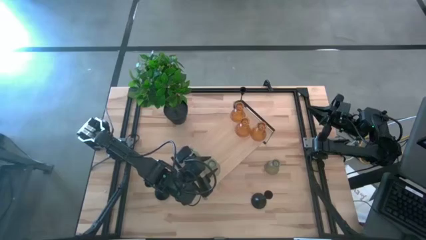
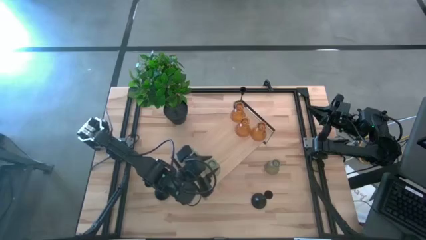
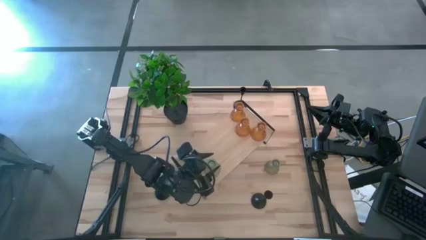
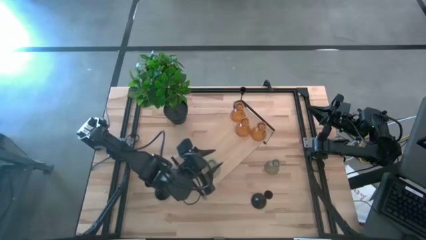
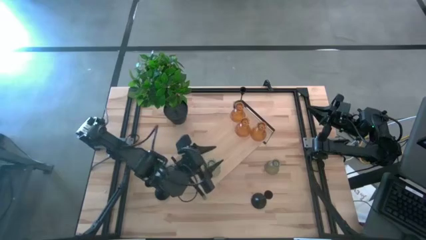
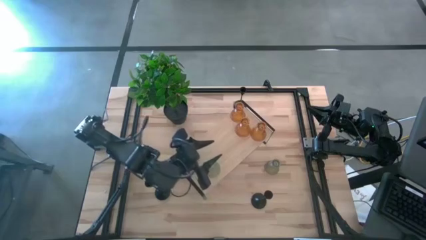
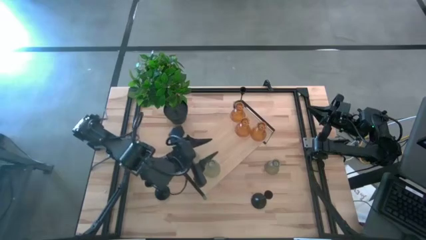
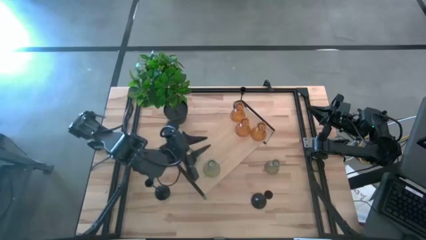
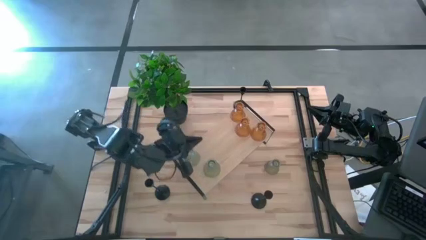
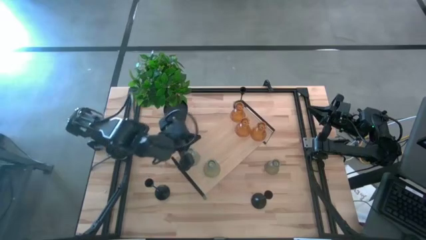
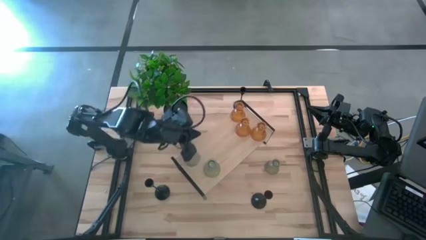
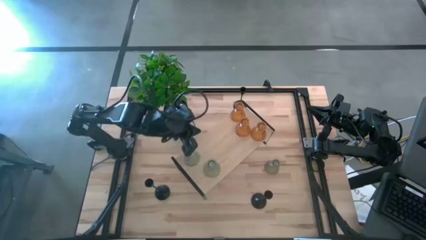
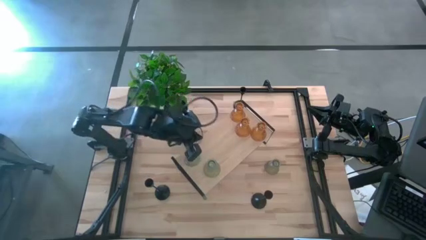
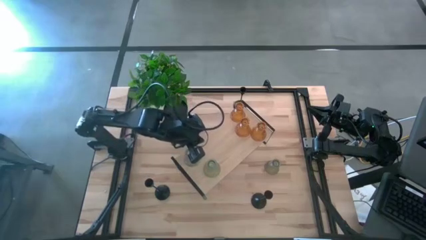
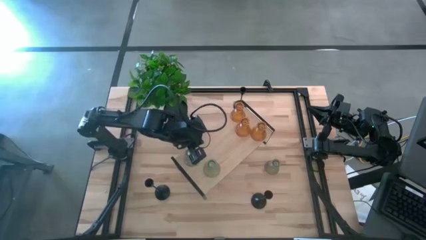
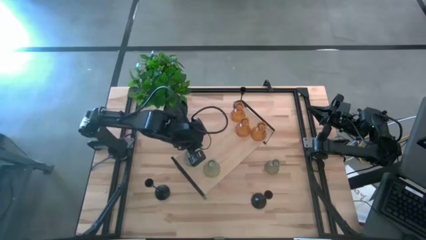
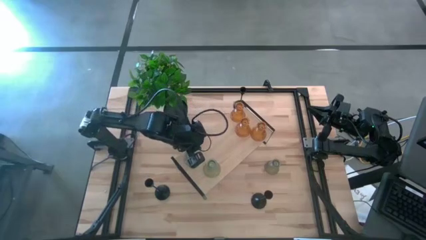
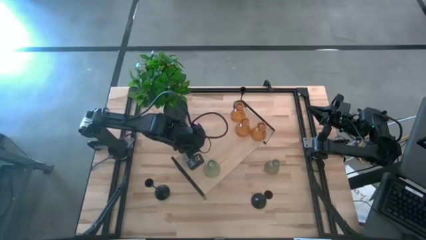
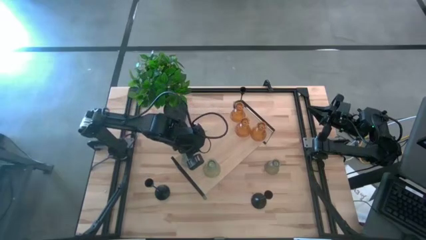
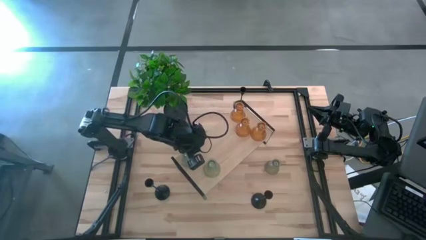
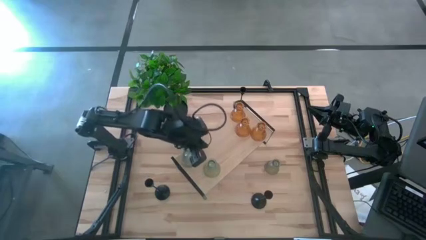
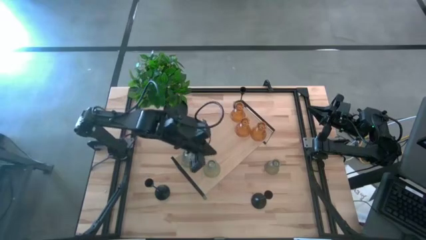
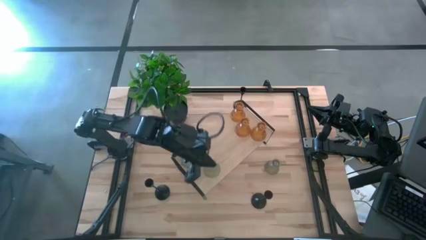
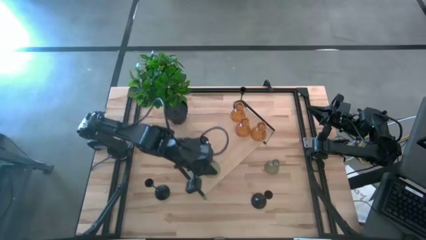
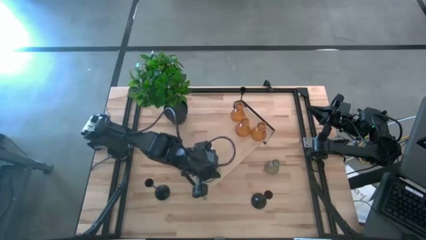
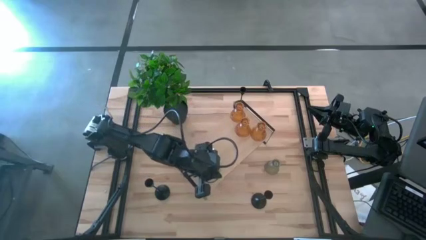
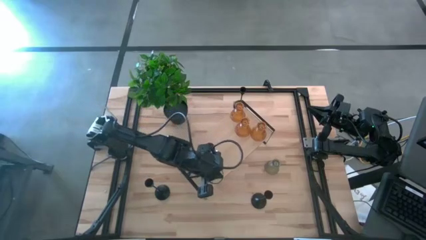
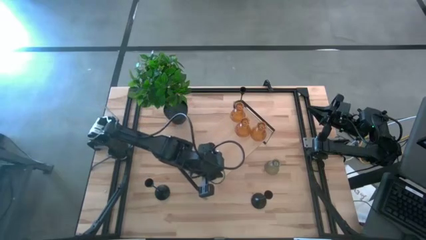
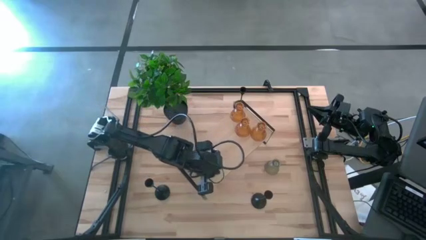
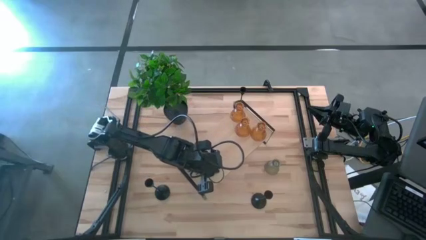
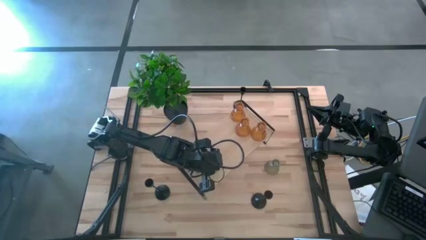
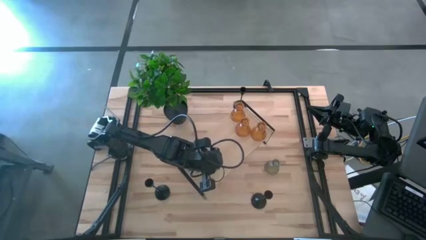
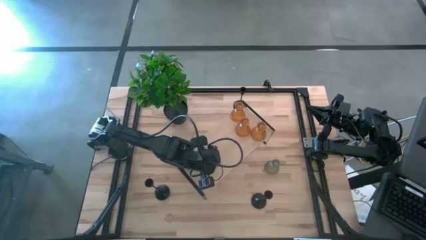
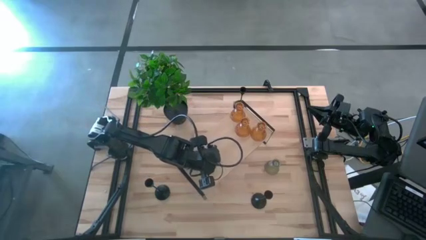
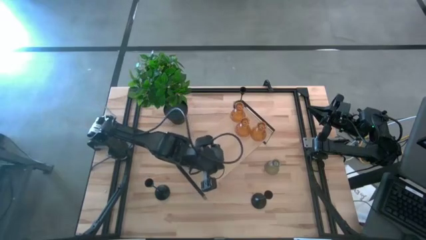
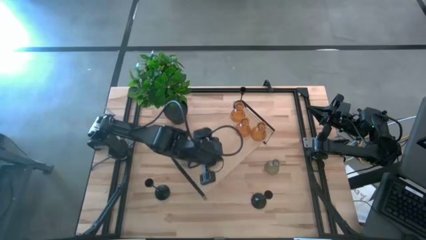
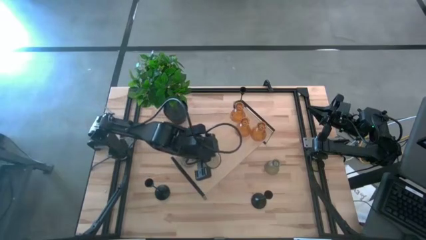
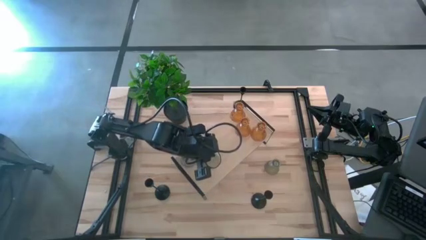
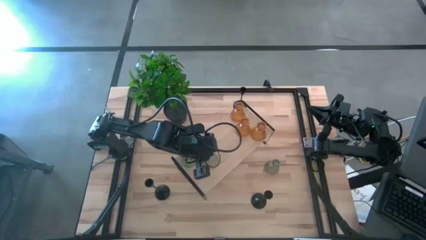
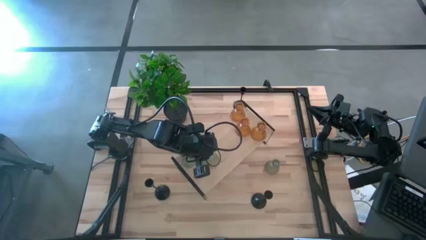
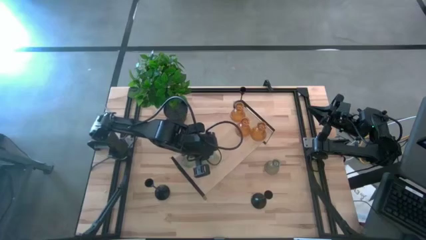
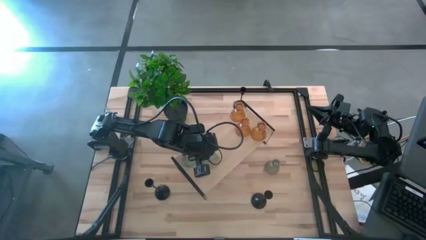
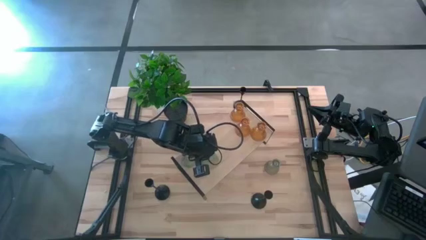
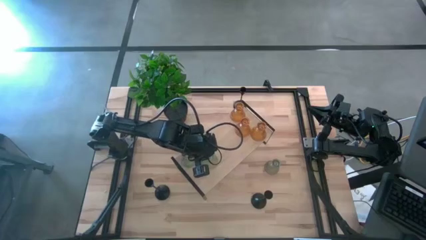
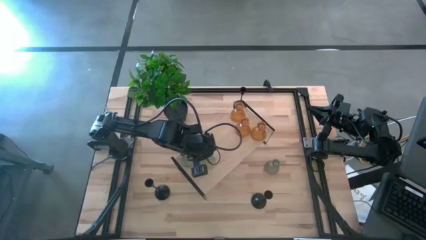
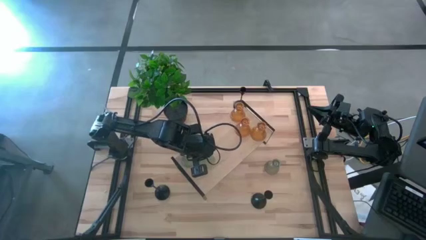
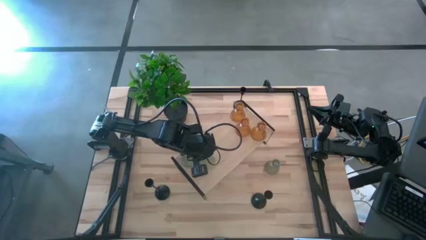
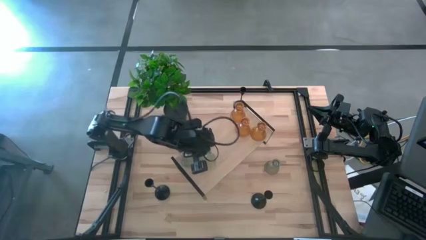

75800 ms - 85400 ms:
Task: Pick & Place candle stick holders
Adjust the transparent glass candle holders on the shelf

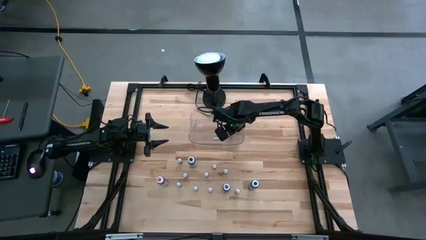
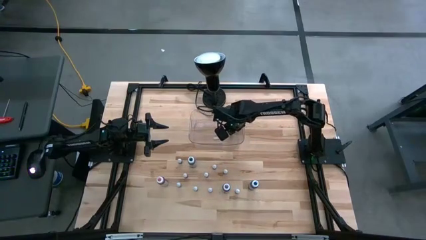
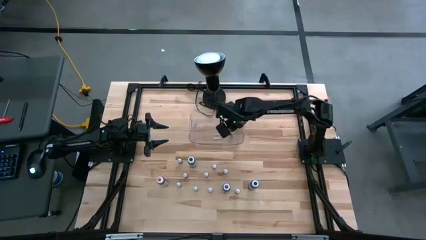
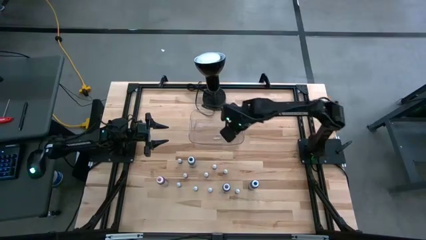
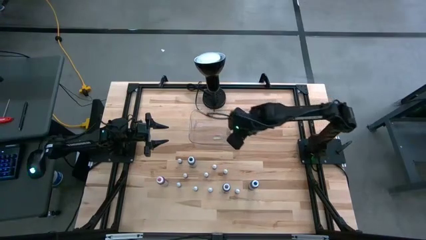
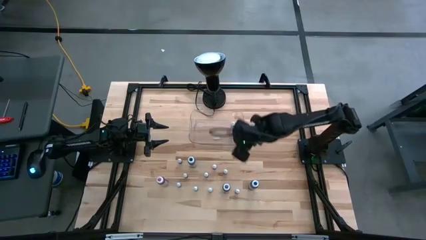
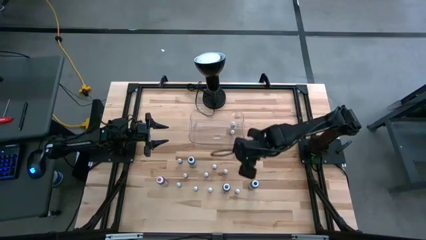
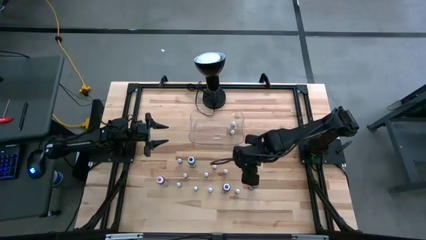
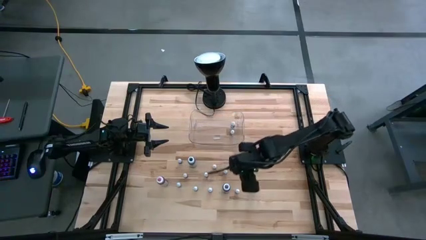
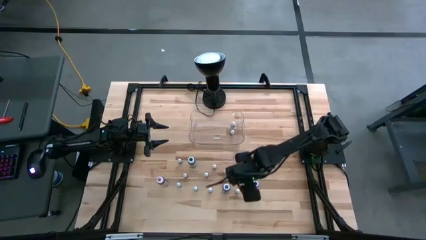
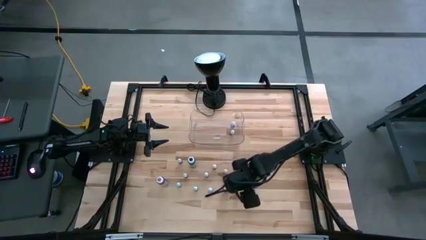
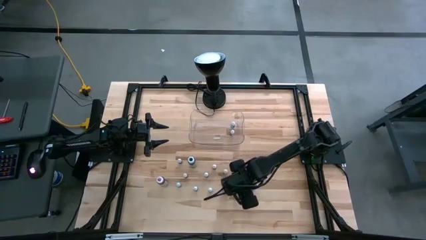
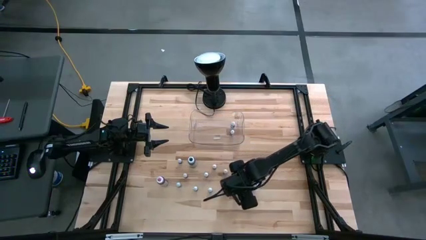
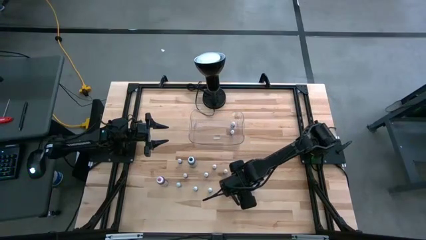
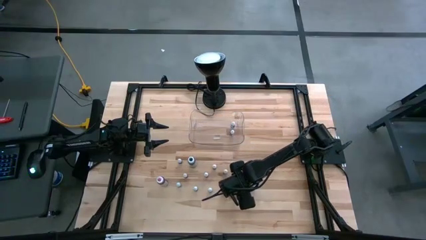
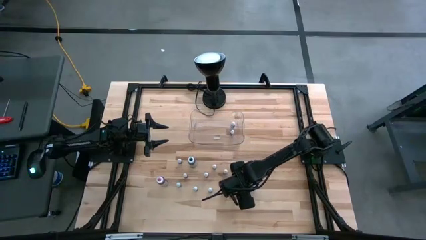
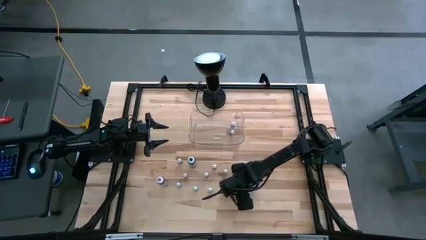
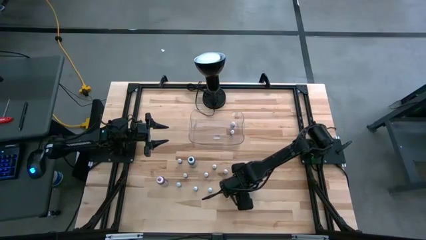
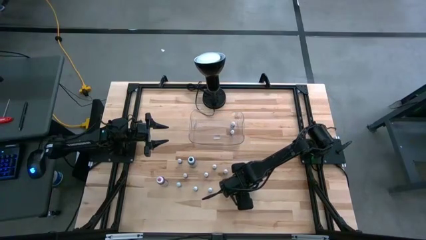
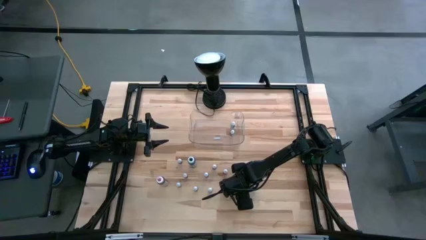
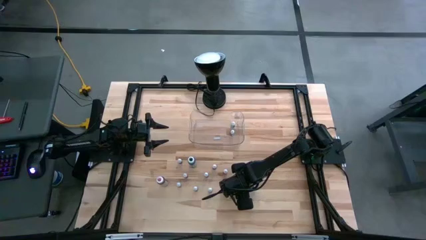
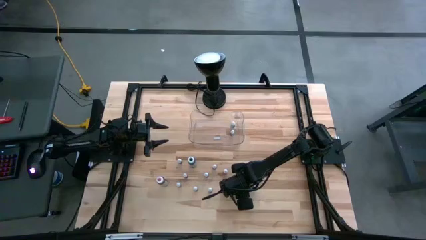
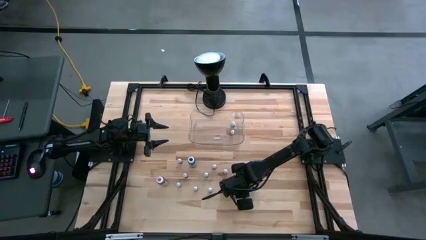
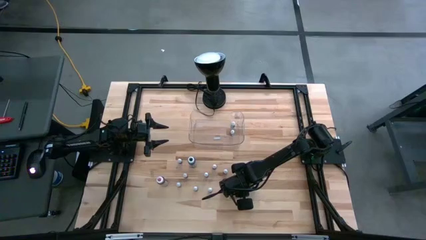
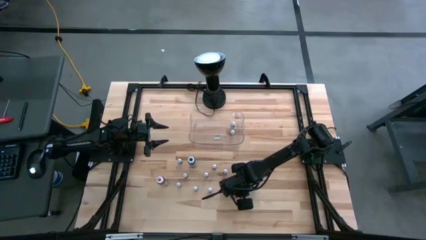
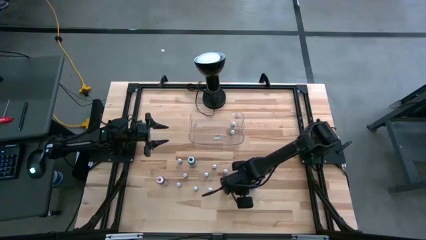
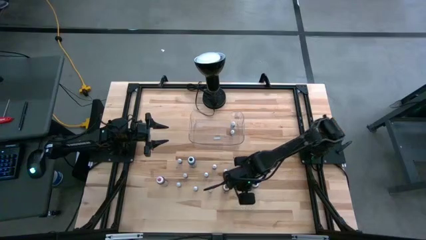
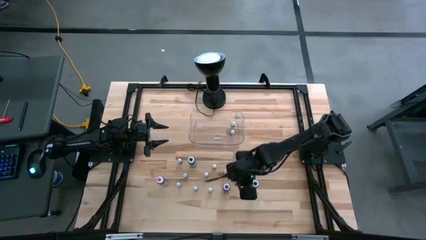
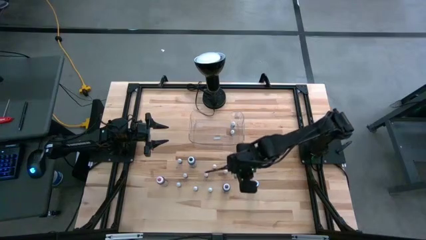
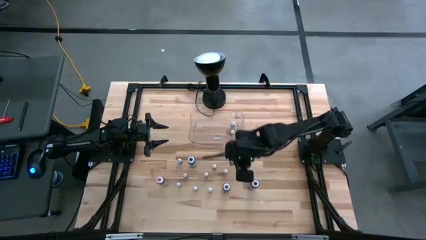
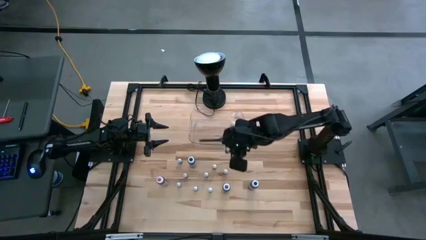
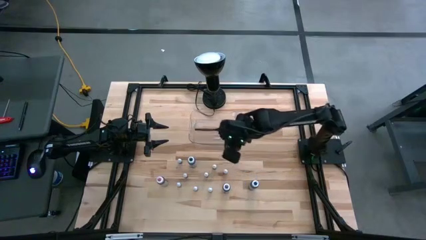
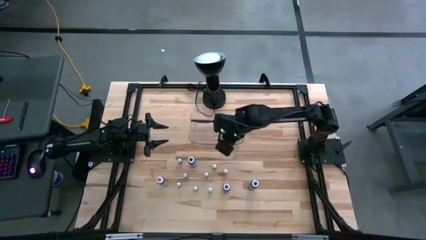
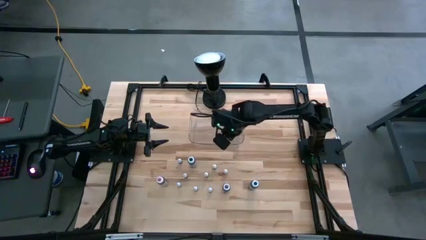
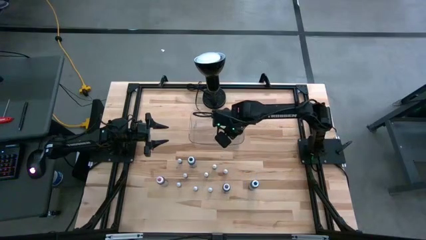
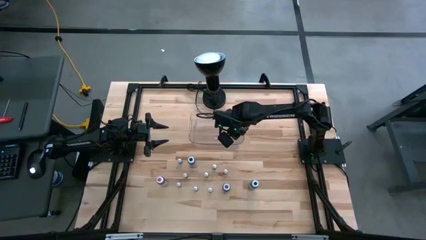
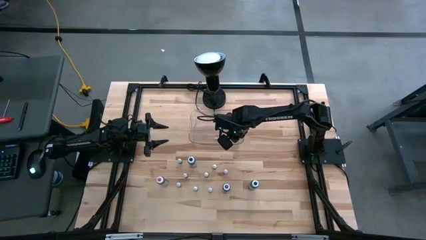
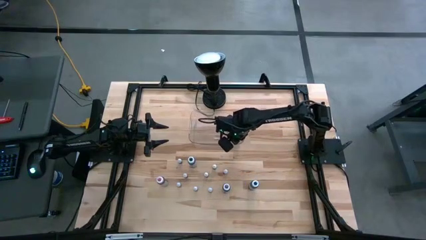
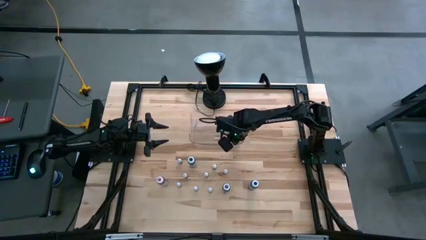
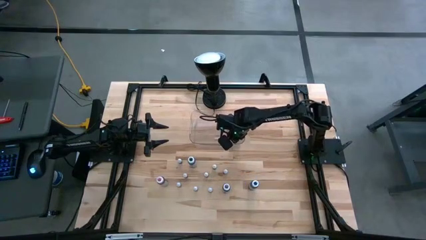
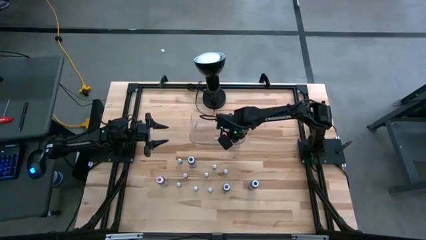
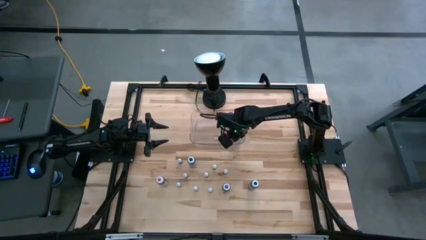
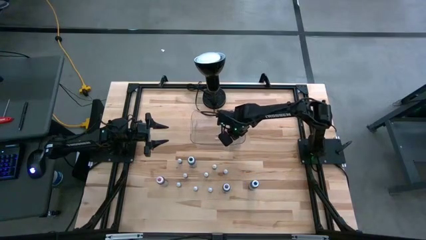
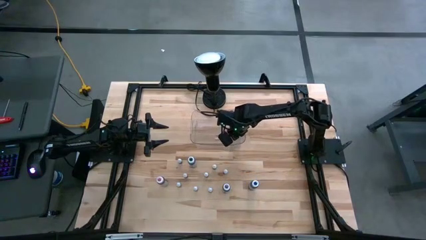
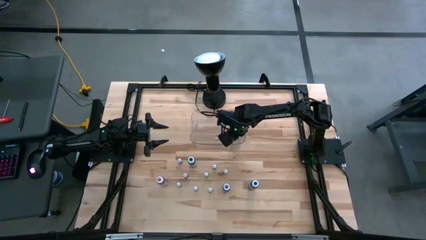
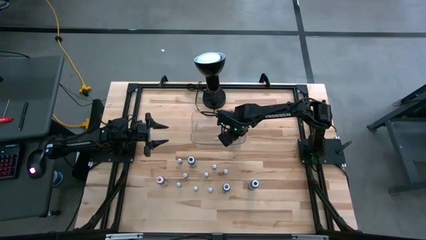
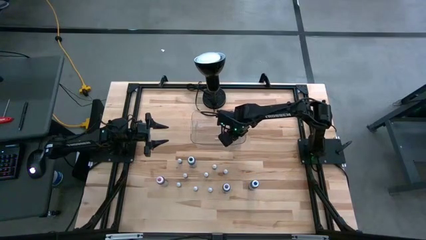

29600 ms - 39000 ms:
Task: Pick & Place food coloring
Put the dark green food coloring bottle into the transparent bin
